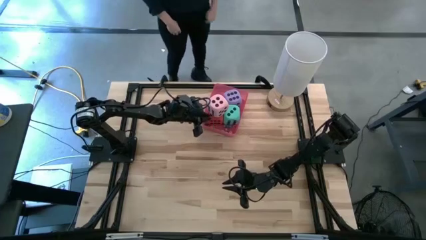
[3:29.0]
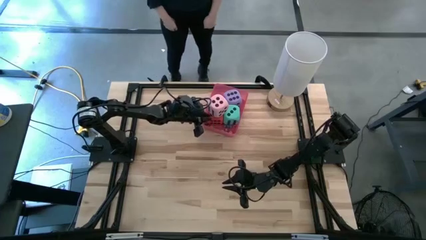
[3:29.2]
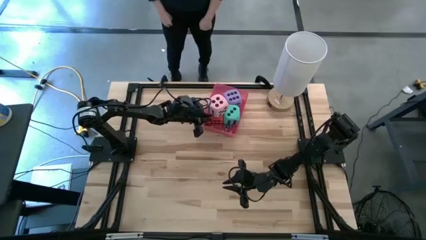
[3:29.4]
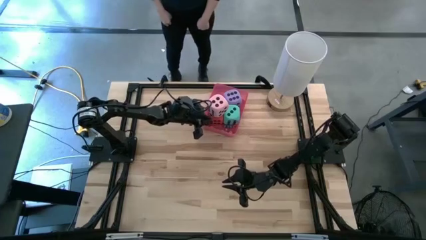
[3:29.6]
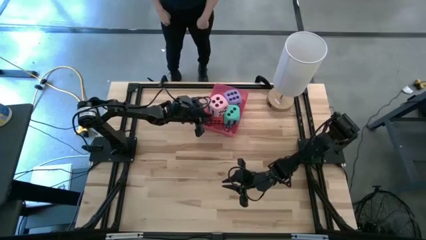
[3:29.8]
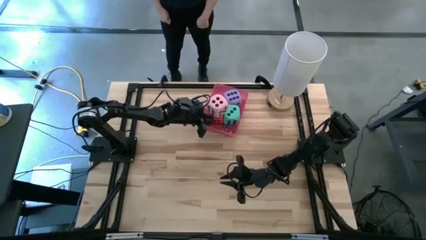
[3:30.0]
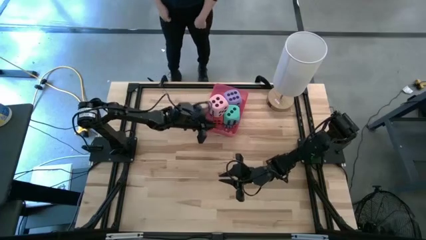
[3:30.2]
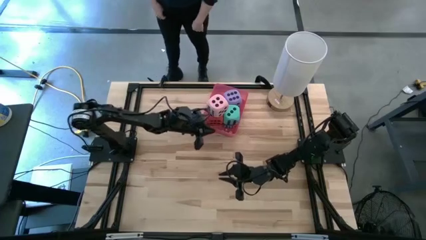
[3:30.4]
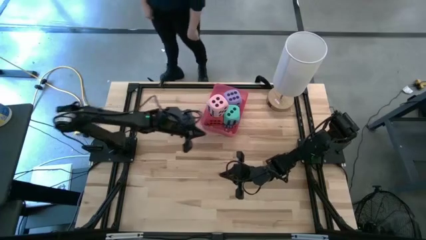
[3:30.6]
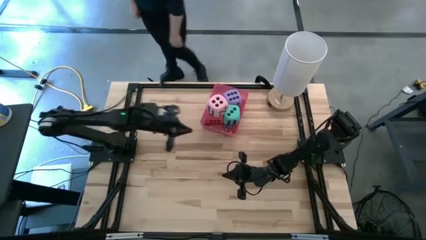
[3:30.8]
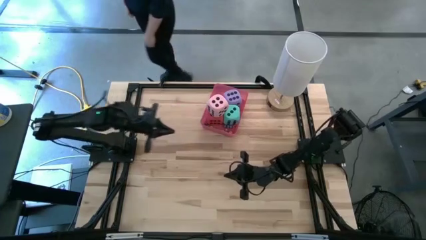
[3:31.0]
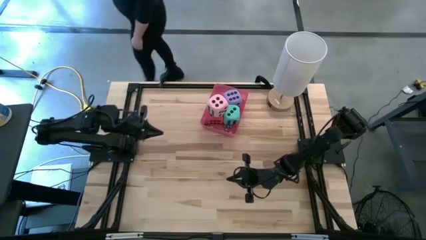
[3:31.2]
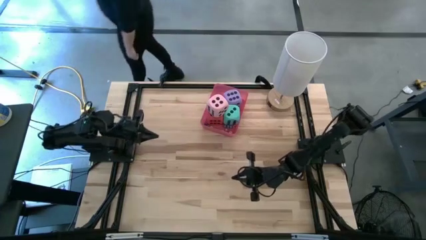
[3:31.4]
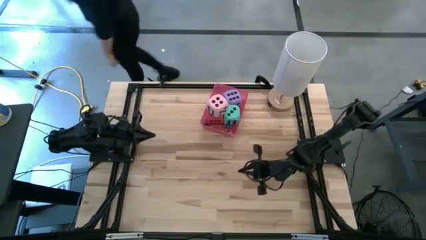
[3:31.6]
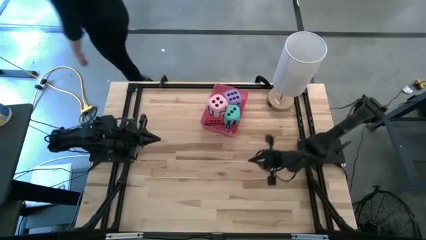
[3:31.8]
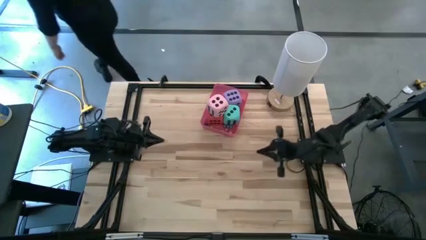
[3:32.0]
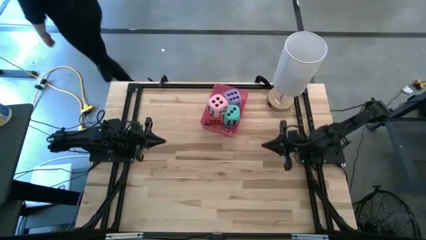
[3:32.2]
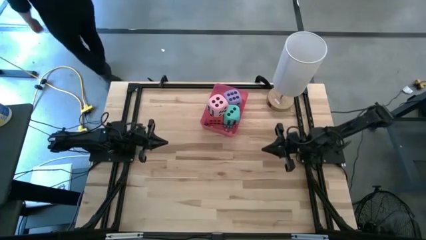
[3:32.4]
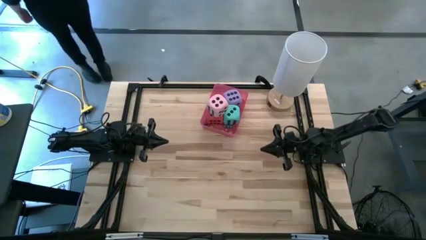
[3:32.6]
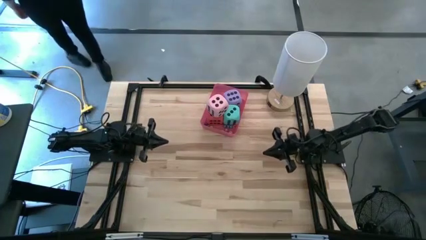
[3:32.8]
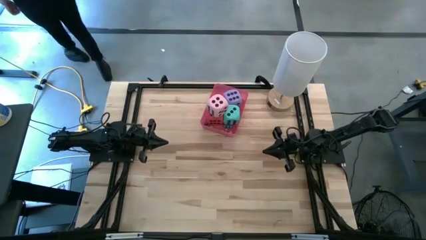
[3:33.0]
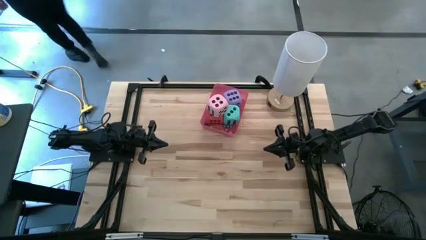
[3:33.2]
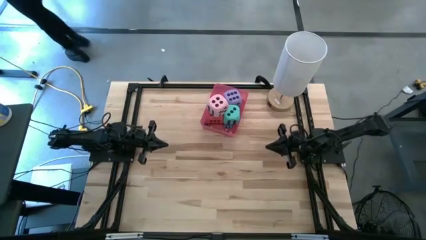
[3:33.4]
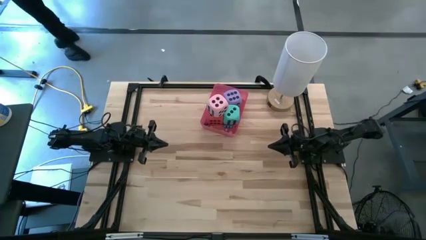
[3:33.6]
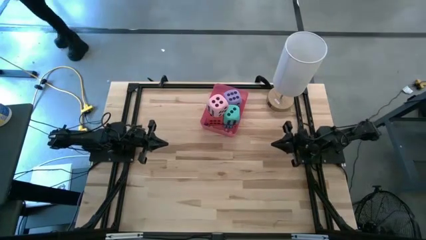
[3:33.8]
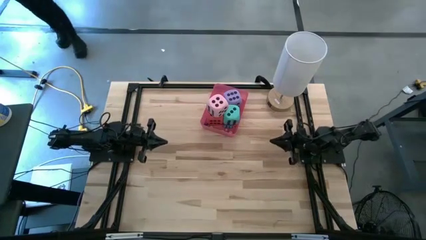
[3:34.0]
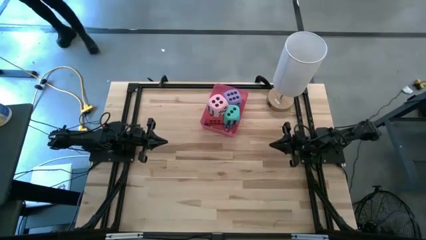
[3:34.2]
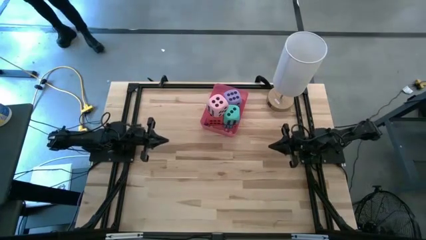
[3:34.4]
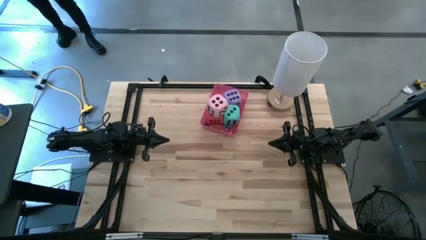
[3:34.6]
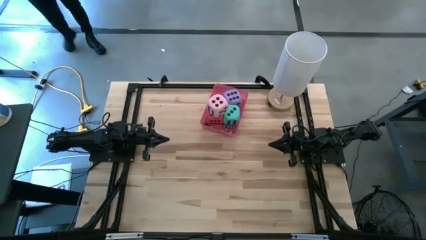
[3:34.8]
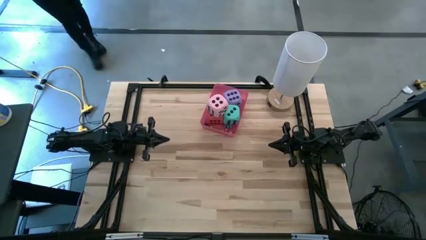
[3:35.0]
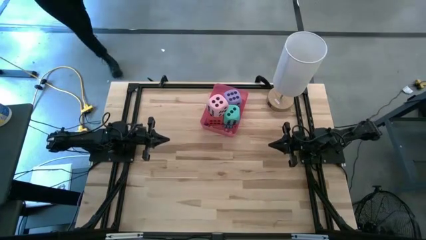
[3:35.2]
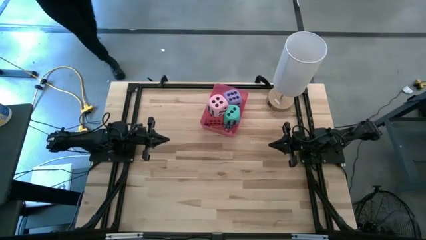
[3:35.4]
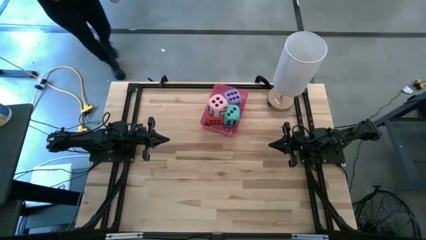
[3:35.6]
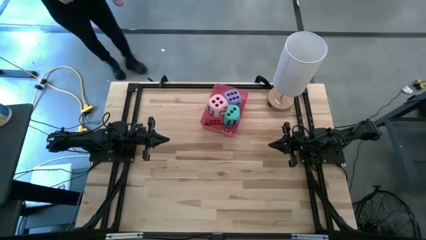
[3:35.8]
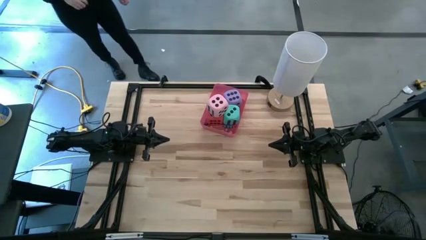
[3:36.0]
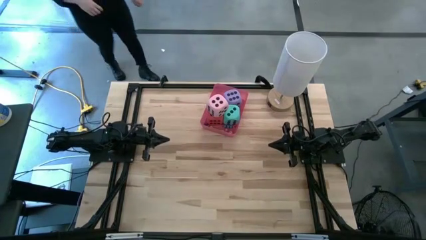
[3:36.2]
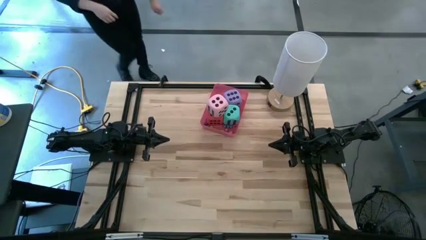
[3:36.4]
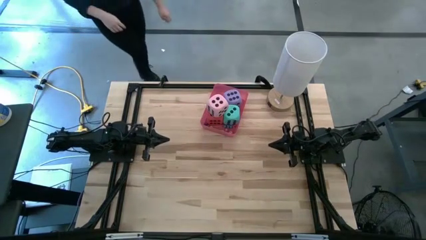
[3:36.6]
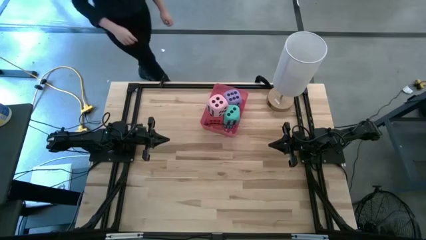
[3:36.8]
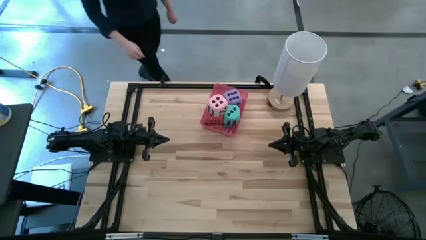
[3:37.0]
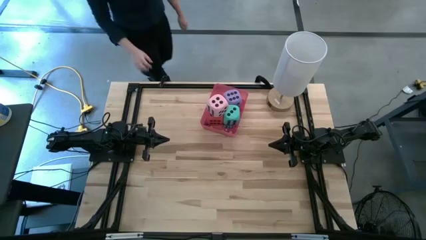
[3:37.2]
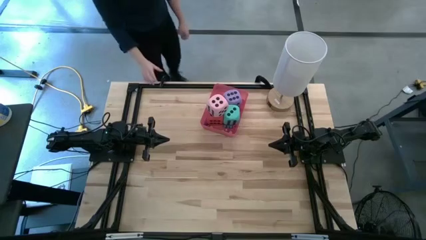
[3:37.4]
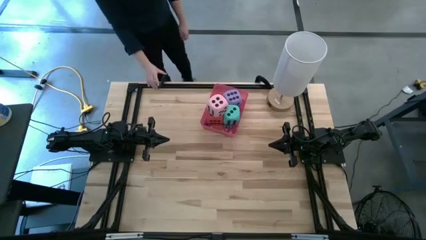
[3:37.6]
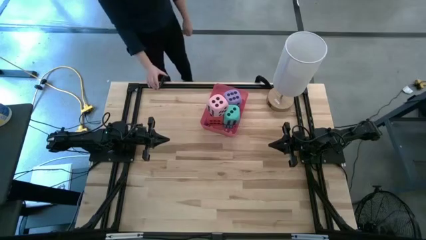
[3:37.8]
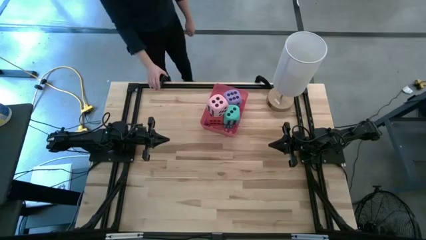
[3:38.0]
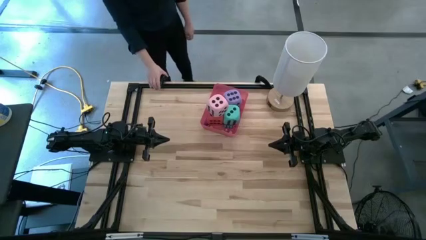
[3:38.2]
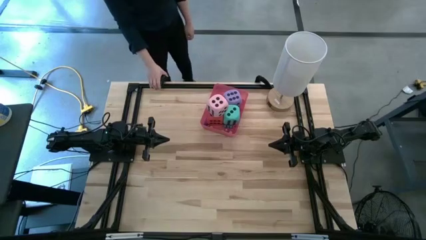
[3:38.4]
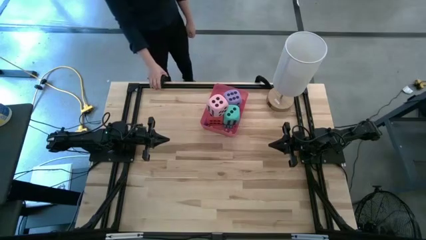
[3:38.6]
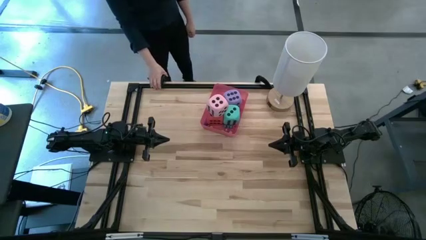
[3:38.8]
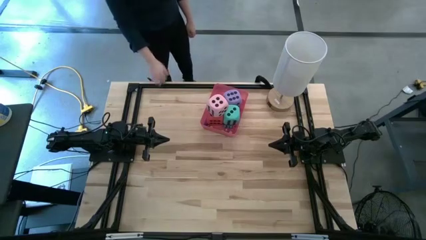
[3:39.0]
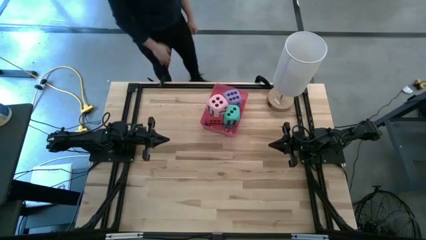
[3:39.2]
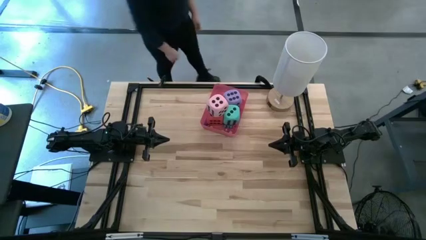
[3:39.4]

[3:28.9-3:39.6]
Task: Pick & Place Dice
Return to Home Position

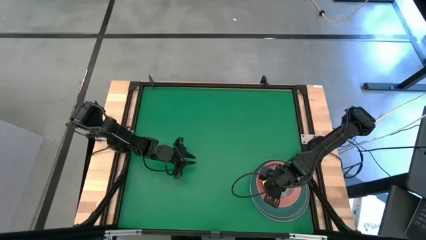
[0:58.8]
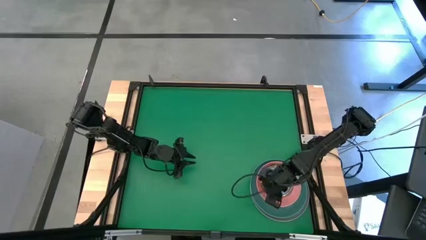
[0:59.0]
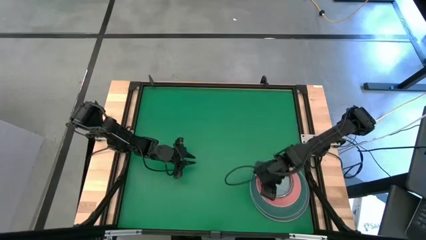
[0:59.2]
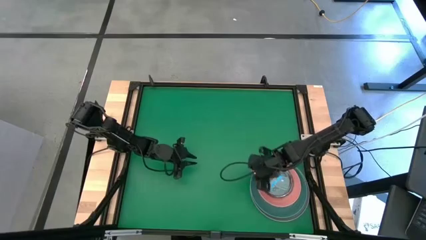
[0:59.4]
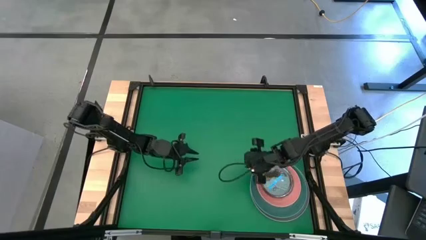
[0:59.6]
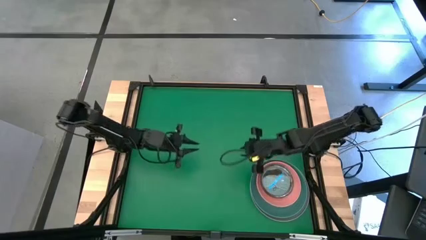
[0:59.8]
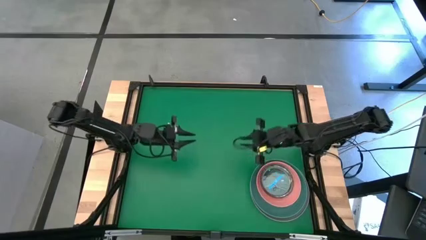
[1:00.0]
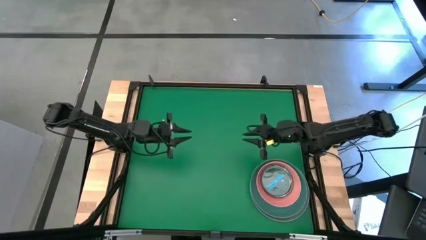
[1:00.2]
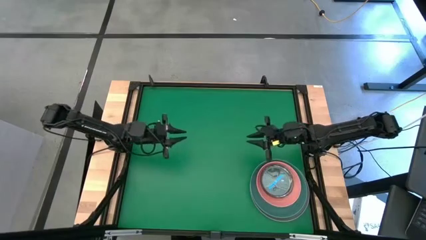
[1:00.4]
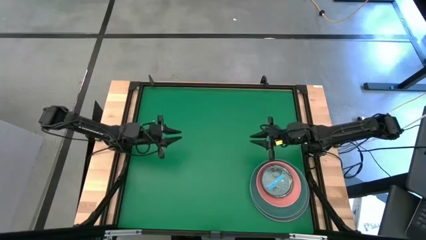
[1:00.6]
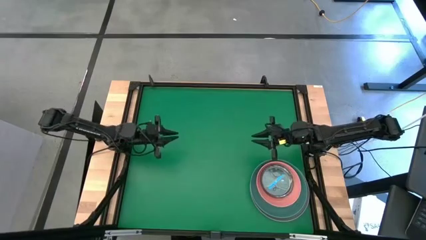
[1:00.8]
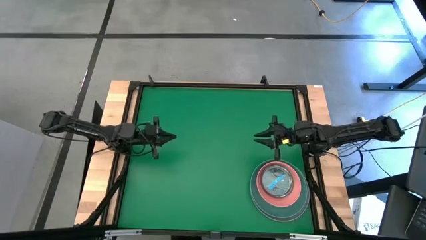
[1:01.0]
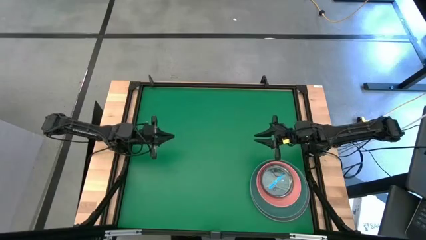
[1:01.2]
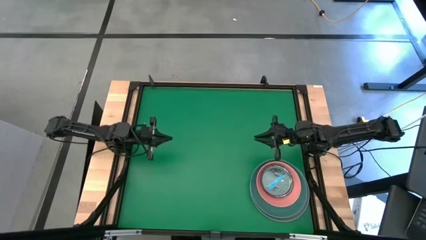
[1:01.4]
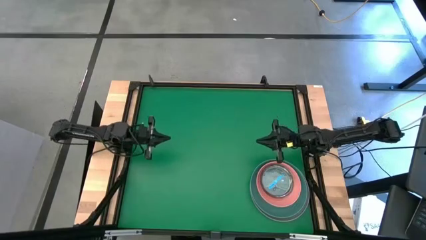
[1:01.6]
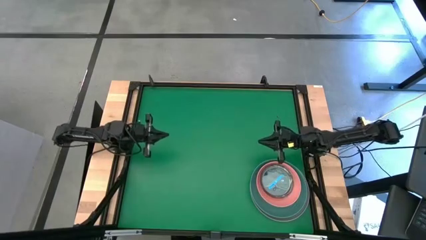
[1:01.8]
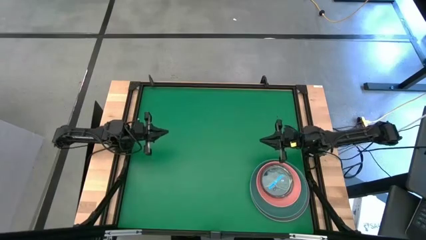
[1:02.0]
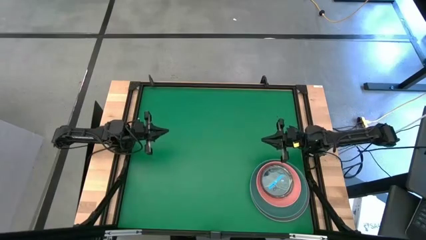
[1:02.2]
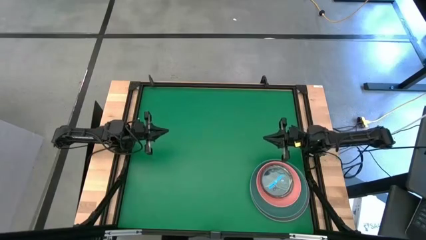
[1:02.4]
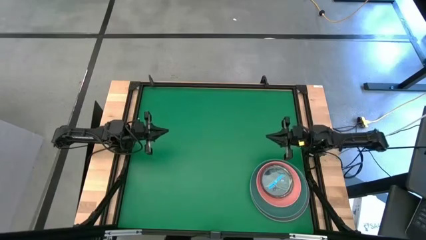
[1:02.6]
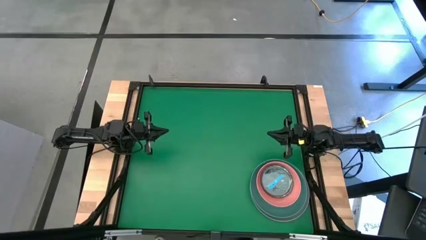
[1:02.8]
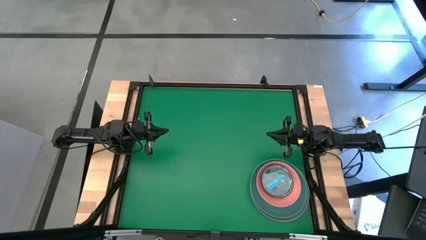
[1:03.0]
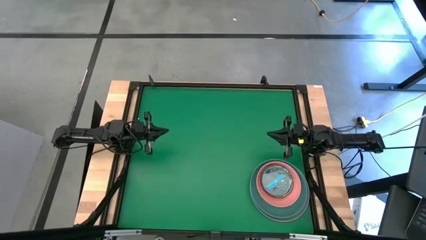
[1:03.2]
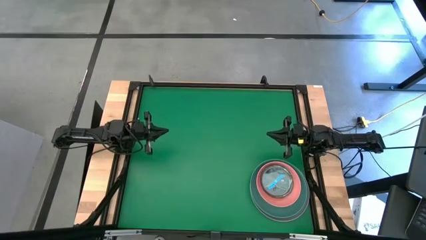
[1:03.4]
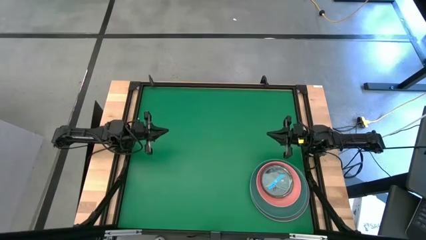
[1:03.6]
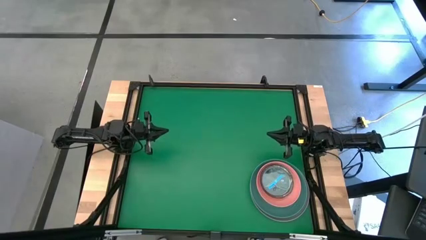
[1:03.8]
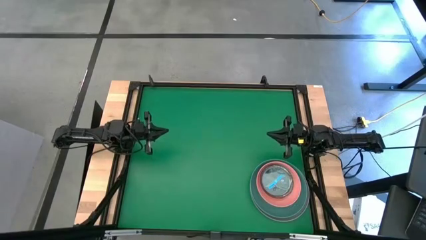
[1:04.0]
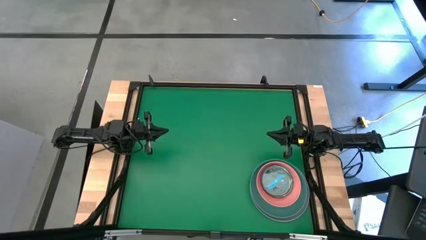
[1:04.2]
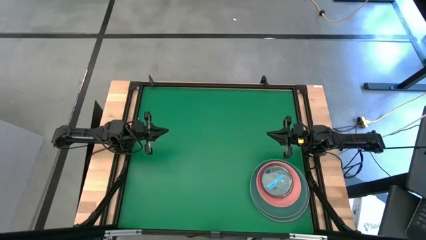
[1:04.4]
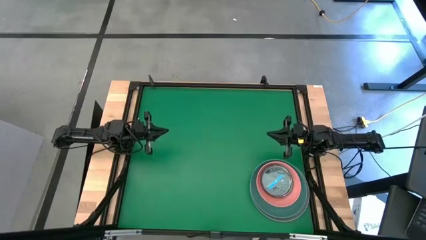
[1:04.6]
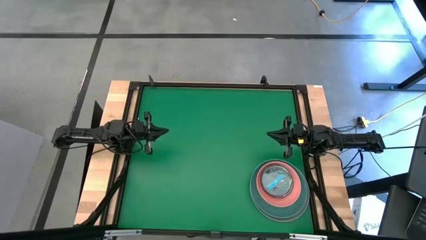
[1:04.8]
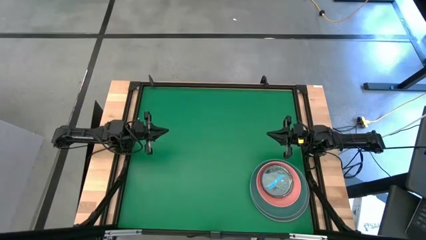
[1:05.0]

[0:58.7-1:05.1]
Task: Stack plastic plates
Return to Home Position
